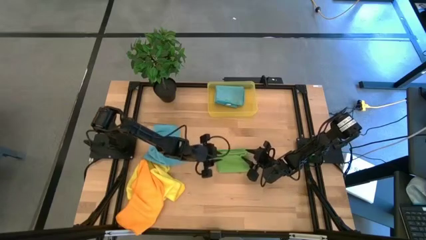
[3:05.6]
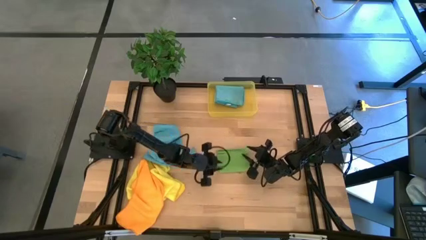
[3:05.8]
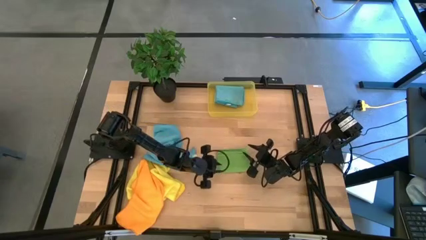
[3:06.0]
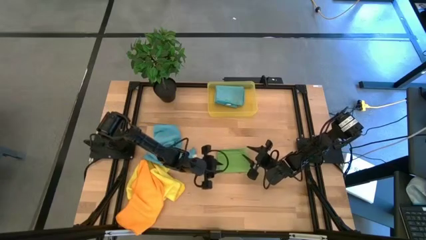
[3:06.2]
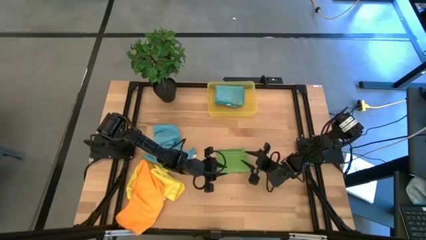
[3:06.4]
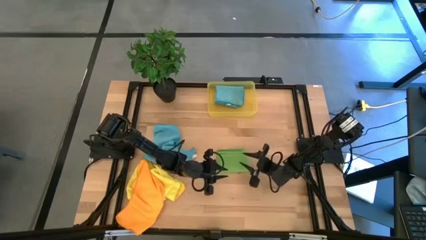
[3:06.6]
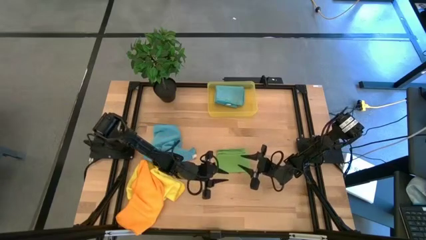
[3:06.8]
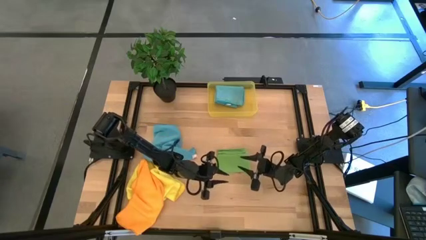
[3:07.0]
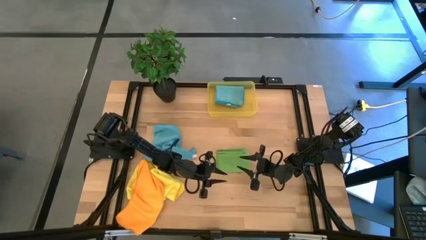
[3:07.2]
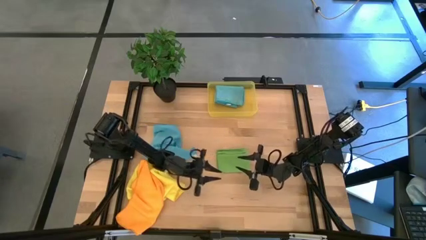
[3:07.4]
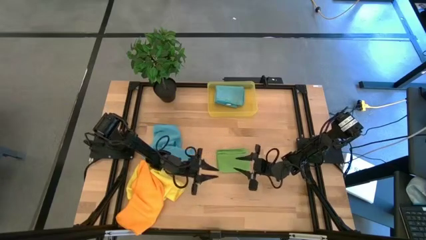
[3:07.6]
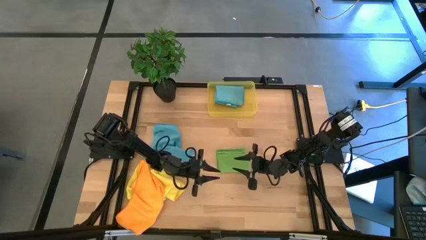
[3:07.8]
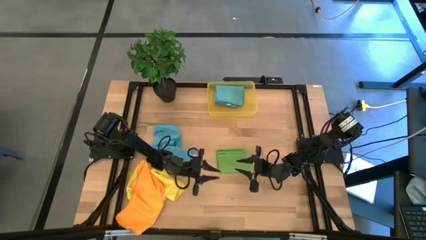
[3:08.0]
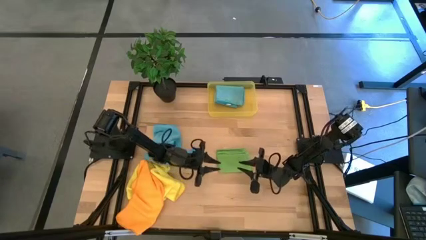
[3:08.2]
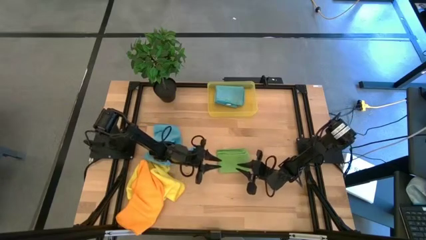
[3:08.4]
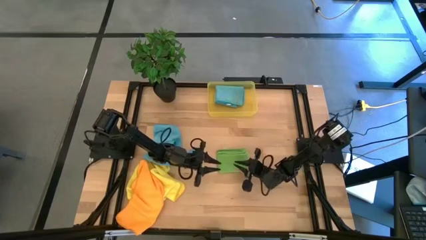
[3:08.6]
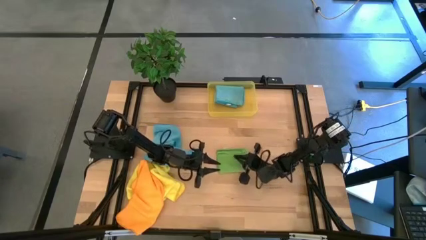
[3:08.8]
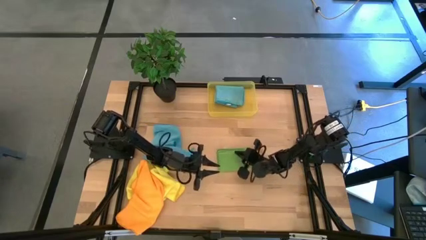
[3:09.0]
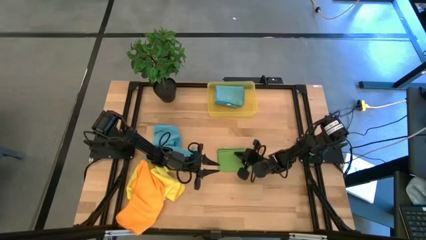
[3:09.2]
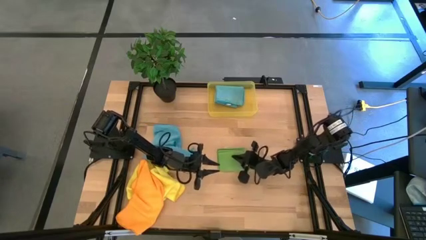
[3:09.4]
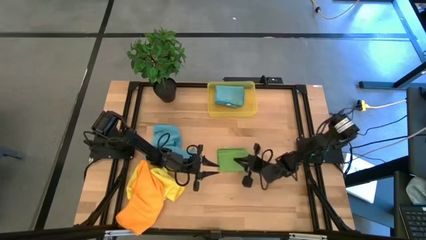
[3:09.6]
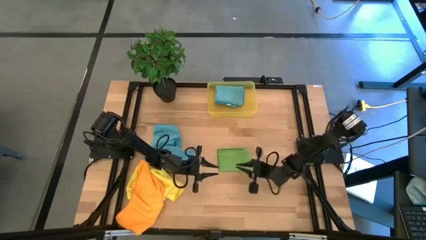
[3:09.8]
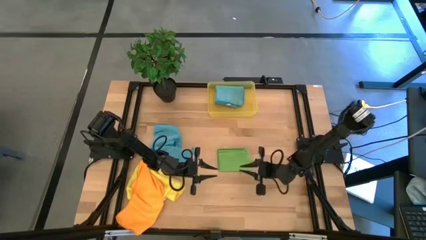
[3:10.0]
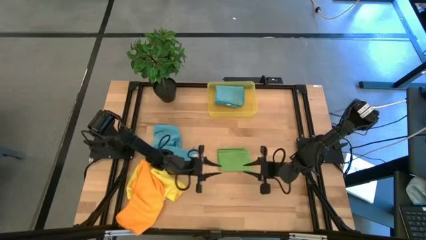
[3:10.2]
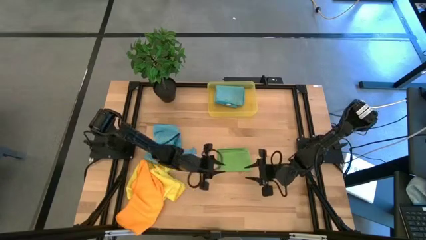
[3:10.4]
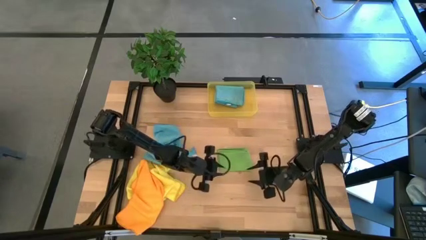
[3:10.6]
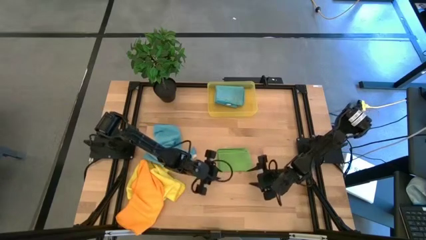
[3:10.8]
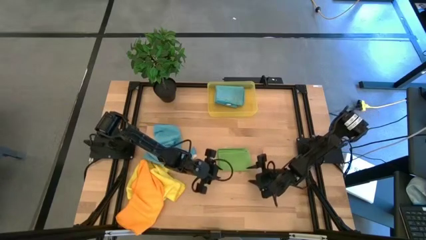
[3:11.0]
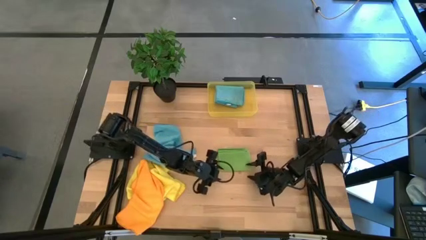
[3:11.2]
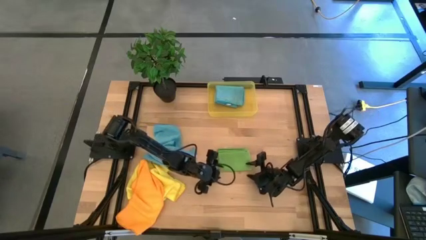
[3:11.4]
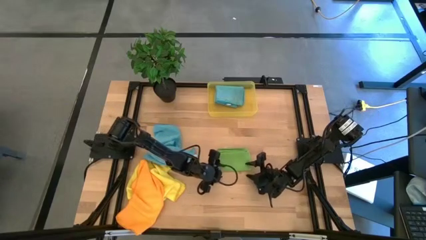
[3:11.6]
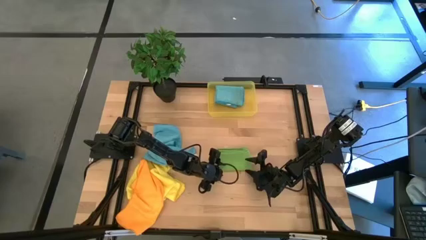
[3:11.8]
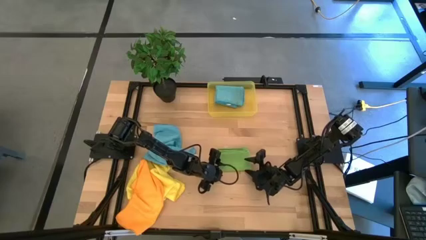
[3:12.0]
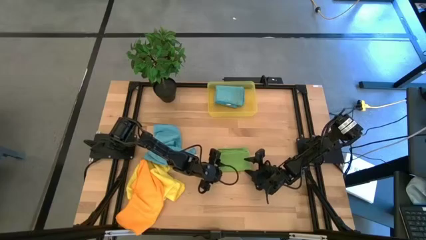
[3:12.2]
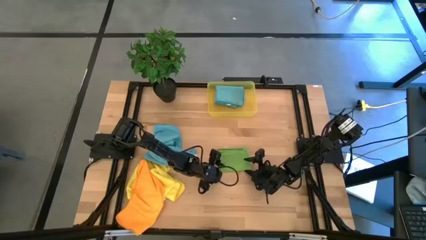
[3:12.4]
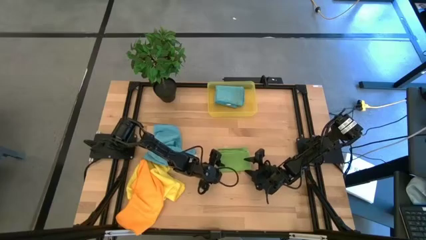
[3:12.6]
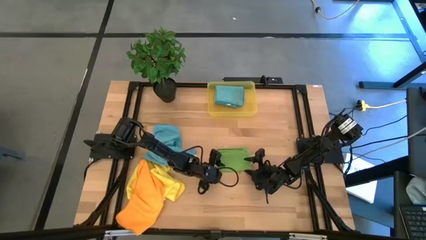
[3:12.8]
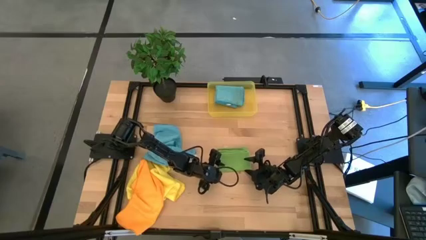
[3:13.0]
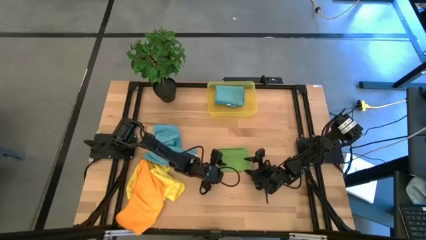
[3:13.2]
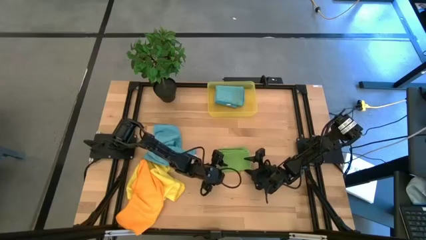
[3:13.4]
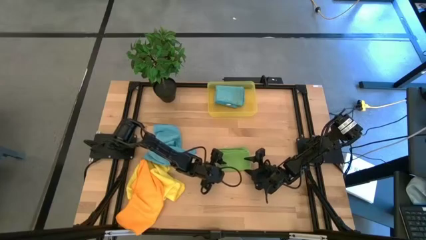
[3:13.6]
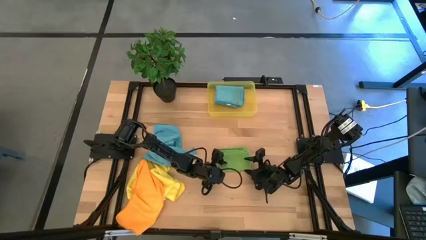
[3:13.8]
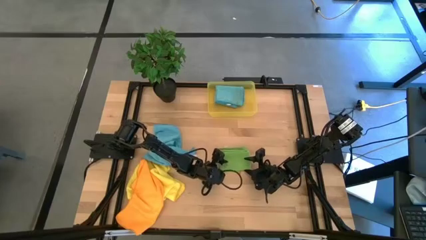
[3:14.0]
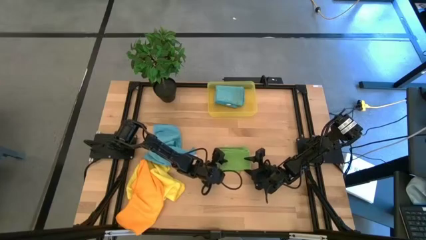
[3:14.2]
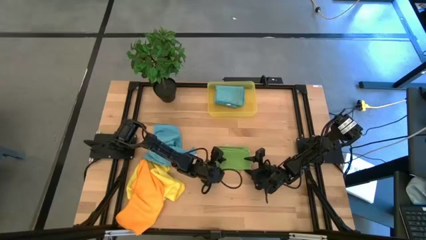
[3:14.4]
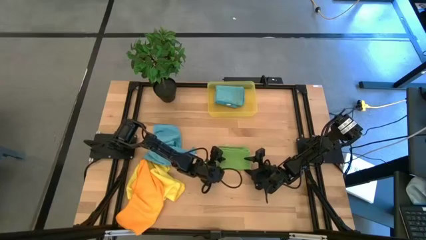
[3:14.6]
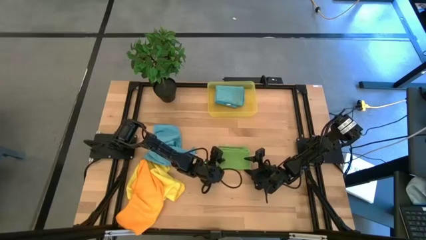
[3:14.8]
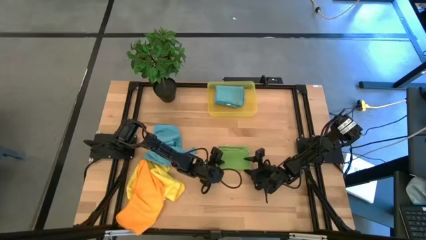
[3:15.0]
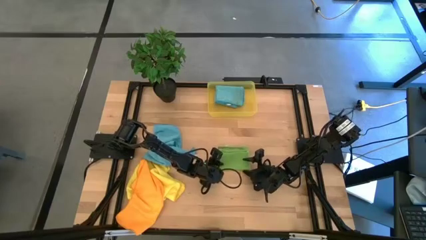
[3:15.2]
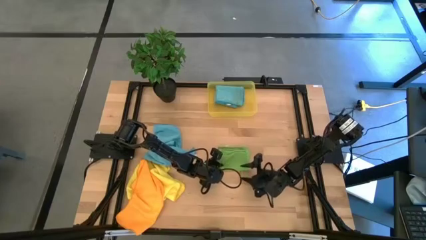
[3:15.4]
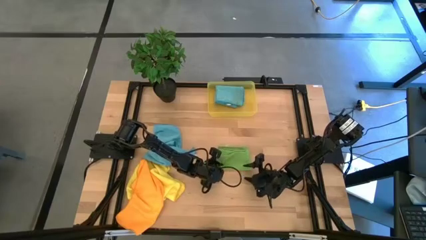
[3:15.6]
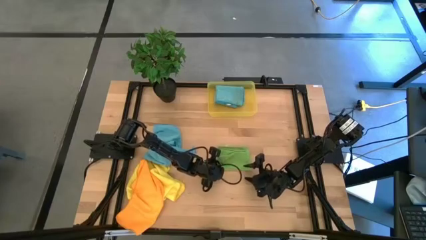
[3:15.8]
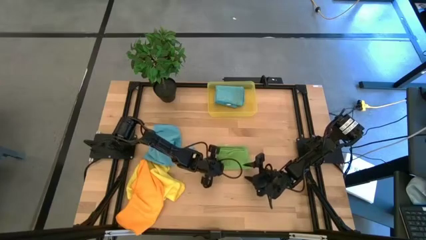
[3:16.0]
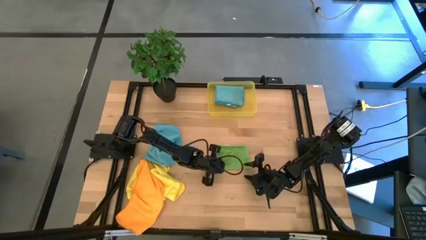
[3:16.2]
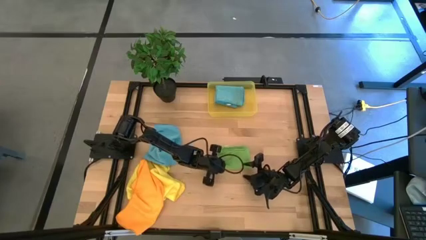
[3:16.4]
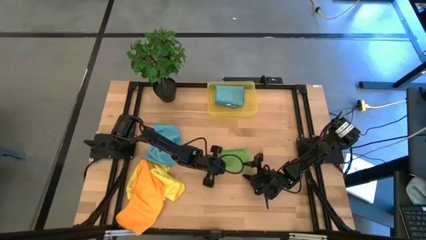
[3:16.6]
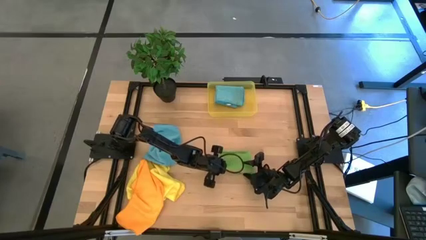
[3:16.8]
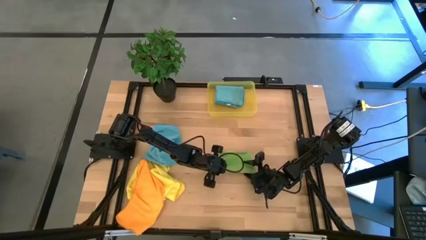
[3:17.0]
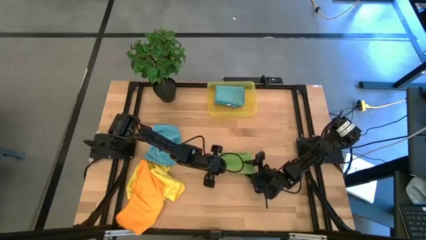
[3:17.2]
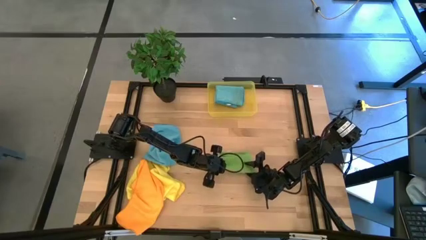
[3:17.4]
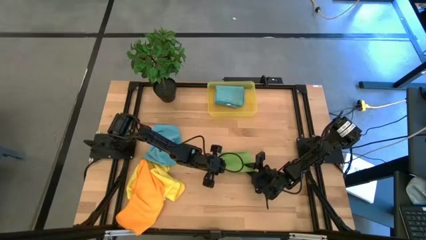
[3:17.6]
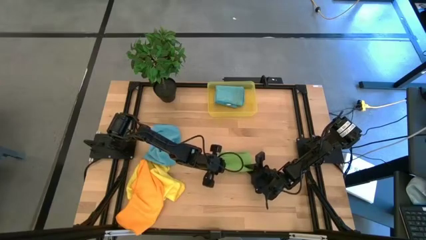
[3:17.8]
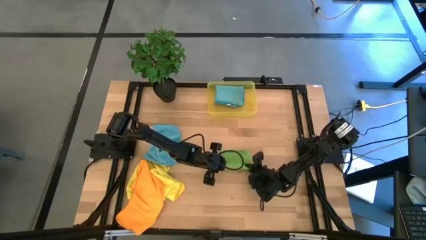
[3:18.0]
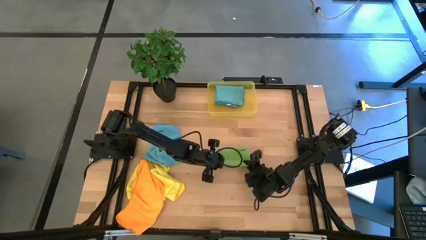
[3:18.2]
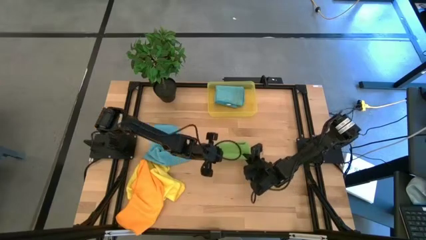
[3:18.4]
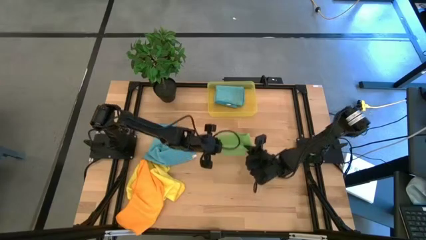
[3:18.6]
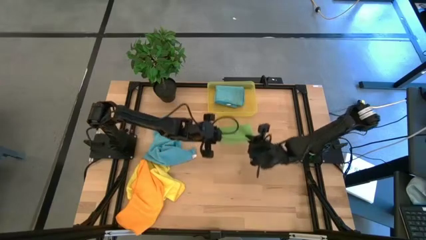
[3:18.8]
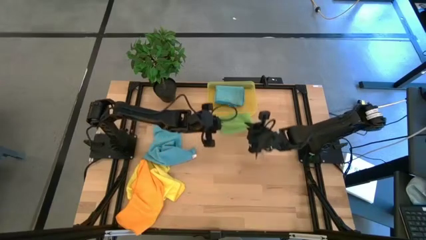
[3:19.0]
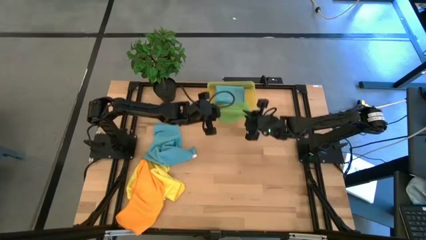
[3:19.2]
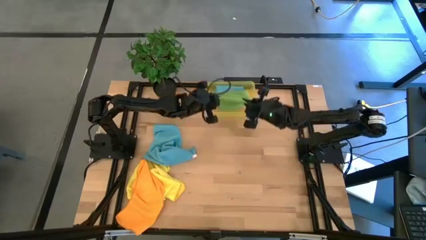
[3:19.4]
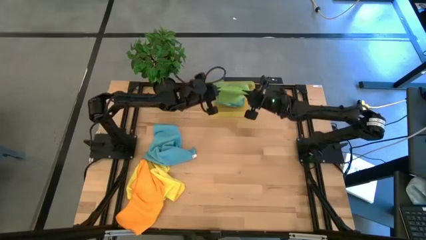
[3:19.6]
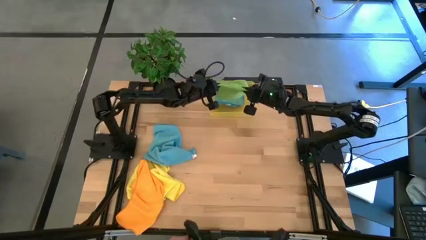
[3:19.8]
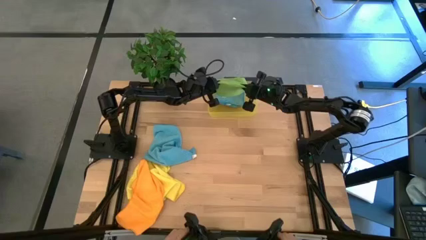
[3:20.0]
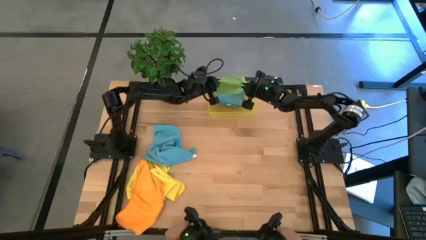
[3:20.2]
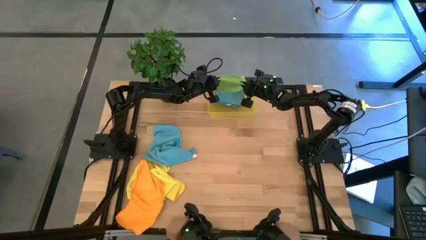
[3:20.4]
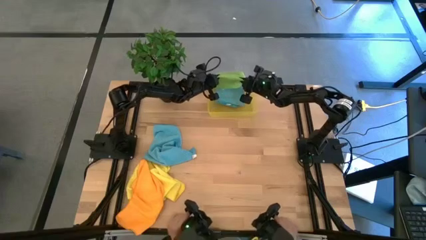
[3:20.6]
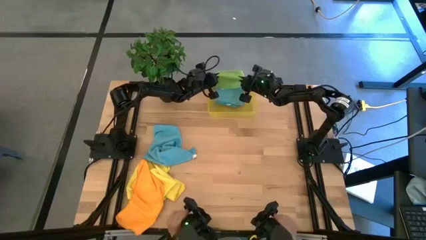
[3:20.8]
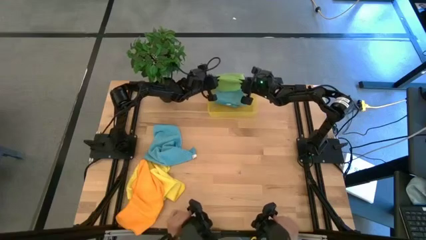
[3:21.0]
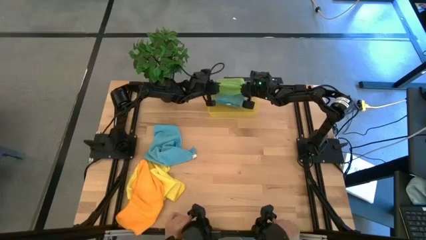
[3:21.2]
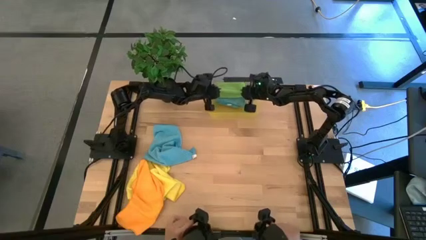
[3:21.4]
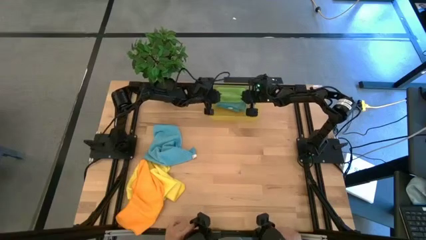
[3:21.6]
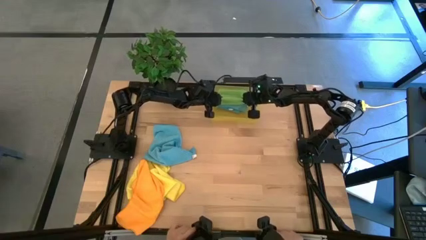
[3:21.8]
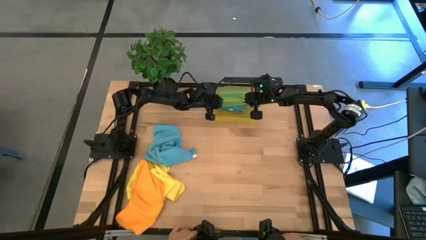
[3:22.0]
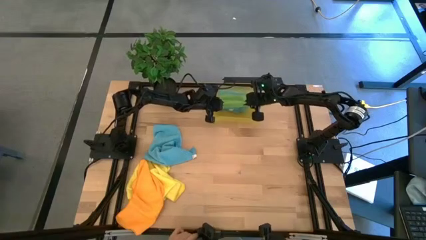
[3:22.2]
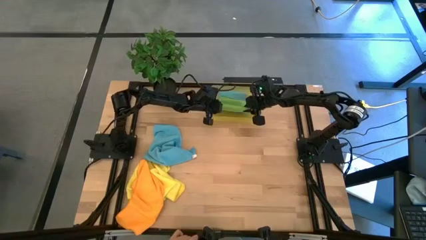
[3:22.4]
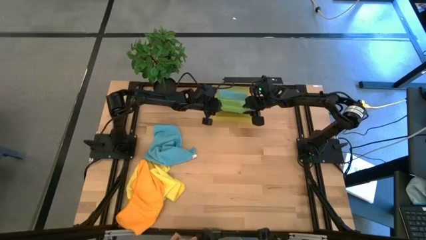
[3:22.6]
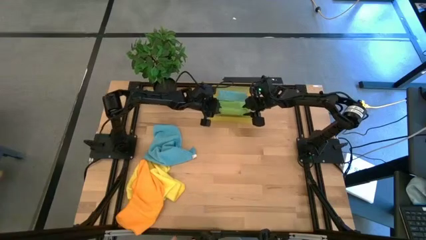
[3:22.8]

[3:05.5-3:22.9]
Task: Fold microfiber towels
Put the folded green microfiber towel into the yellow bin
